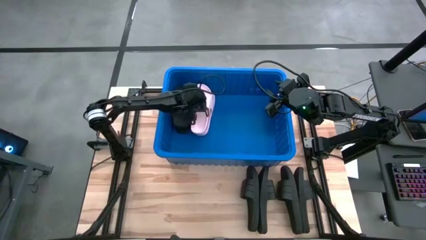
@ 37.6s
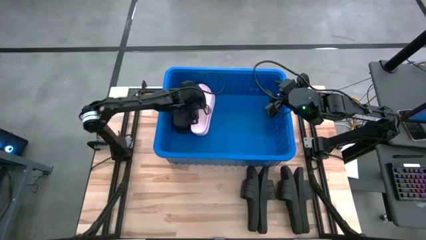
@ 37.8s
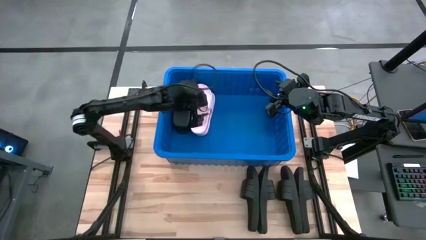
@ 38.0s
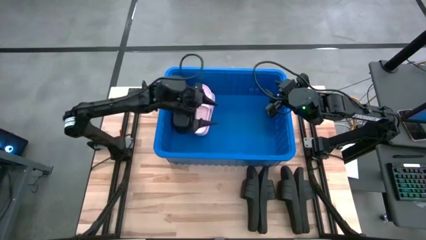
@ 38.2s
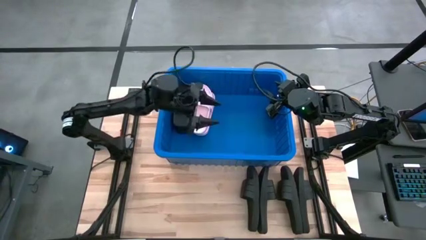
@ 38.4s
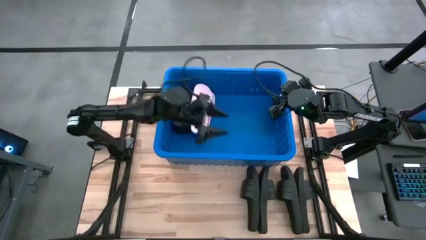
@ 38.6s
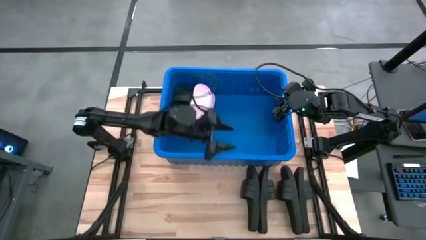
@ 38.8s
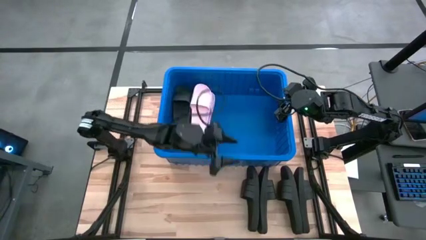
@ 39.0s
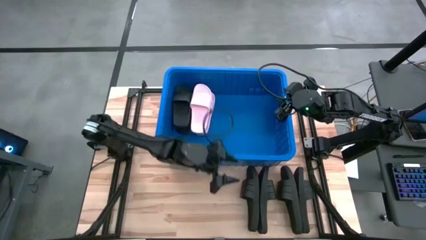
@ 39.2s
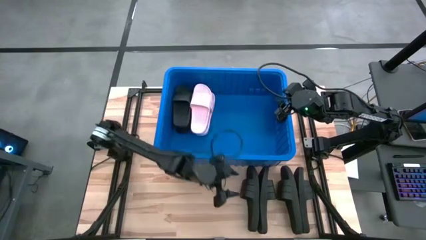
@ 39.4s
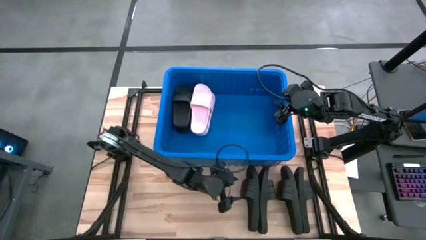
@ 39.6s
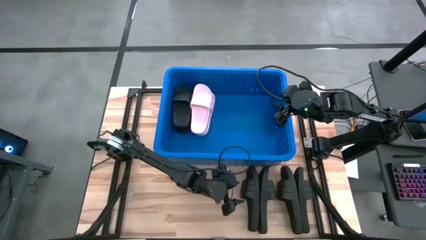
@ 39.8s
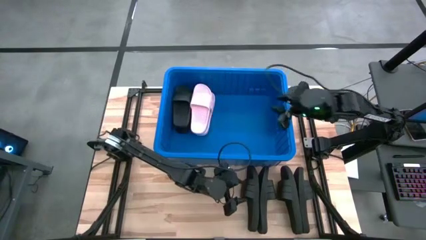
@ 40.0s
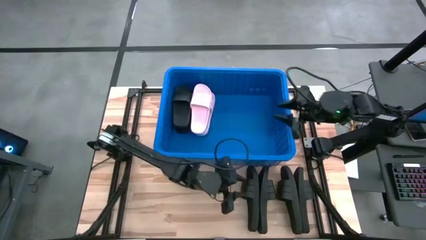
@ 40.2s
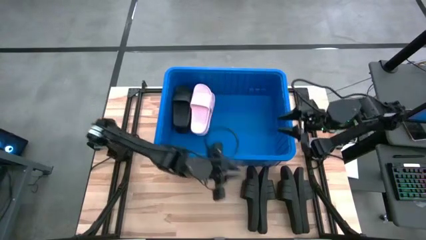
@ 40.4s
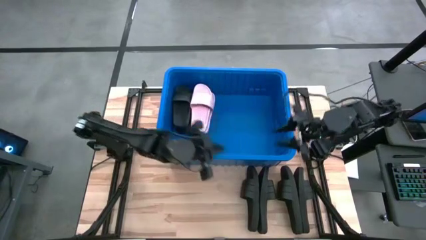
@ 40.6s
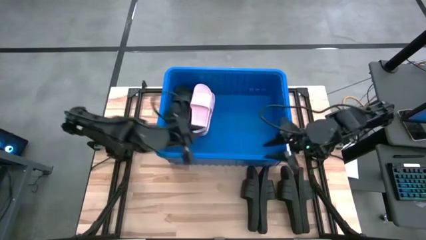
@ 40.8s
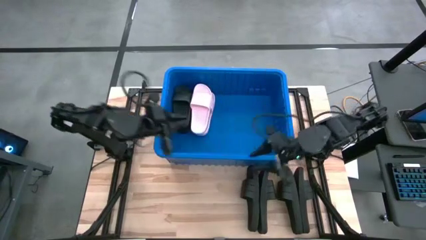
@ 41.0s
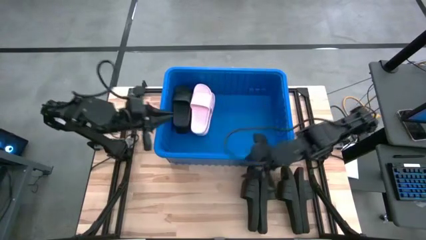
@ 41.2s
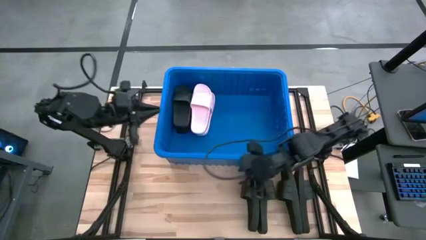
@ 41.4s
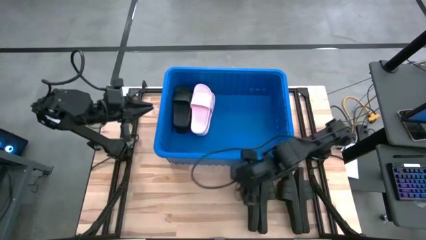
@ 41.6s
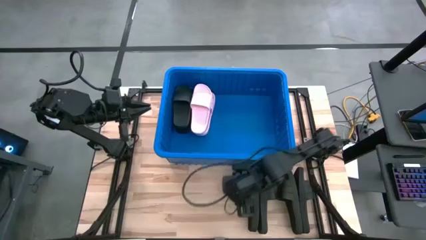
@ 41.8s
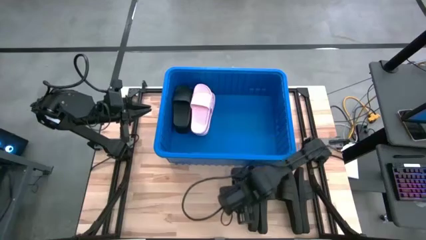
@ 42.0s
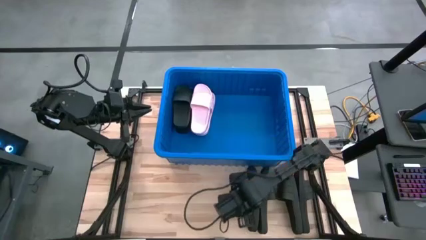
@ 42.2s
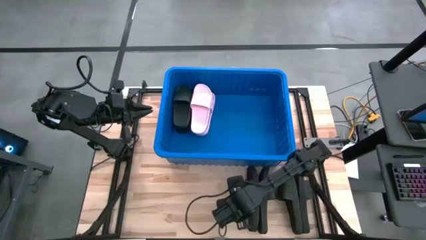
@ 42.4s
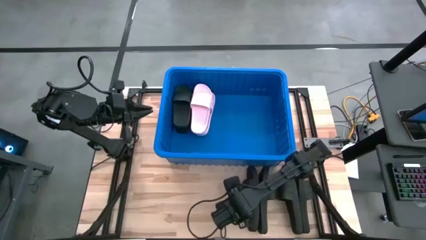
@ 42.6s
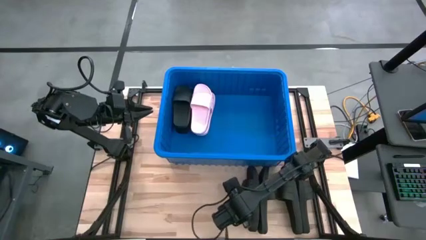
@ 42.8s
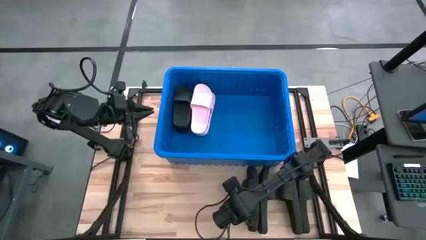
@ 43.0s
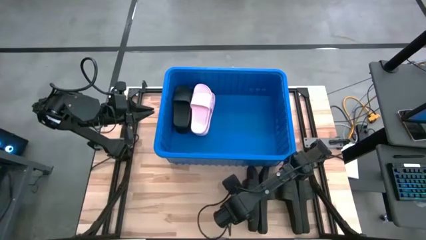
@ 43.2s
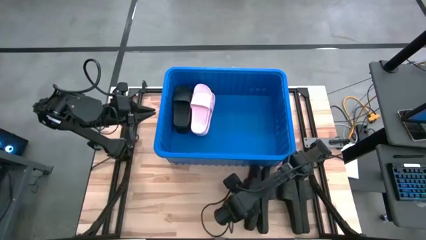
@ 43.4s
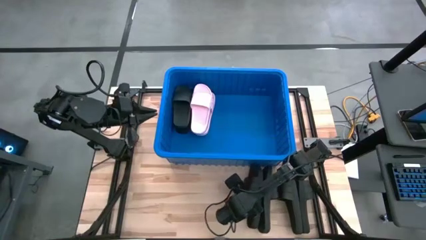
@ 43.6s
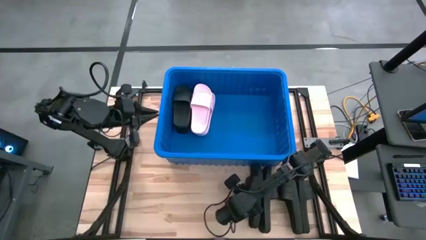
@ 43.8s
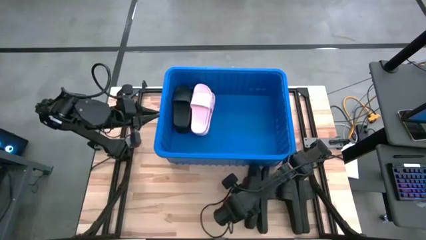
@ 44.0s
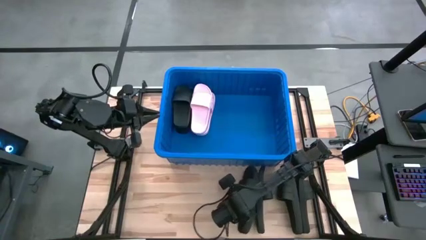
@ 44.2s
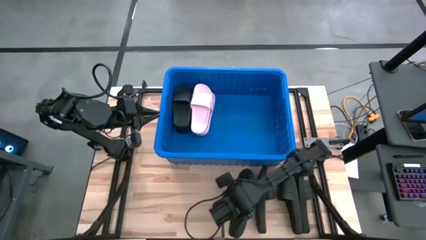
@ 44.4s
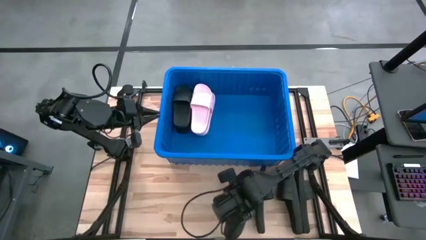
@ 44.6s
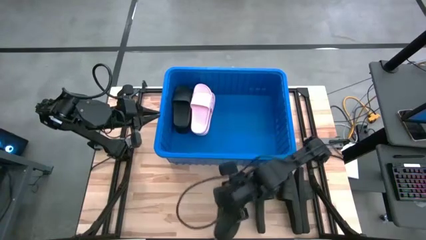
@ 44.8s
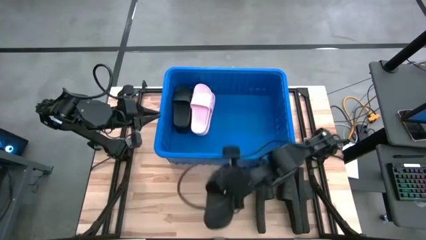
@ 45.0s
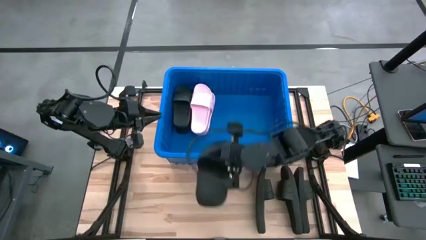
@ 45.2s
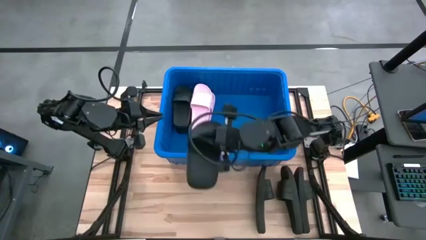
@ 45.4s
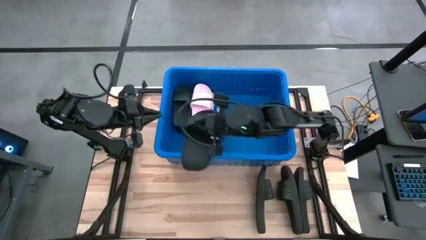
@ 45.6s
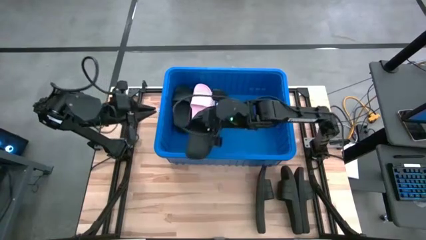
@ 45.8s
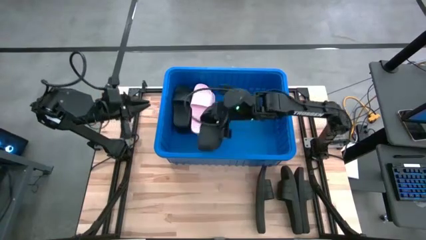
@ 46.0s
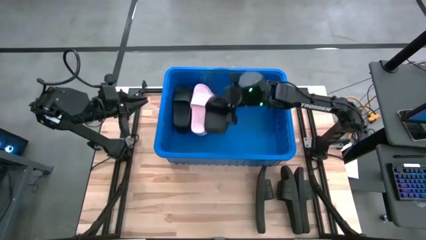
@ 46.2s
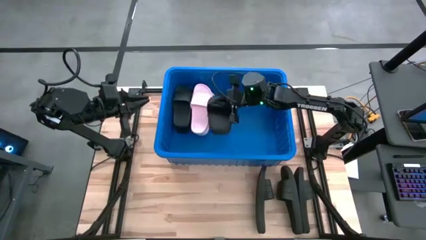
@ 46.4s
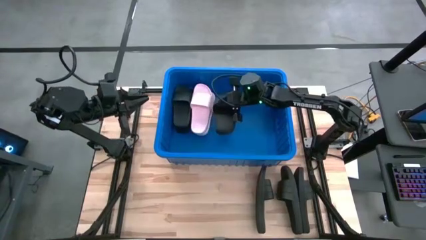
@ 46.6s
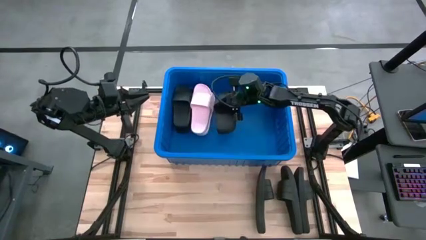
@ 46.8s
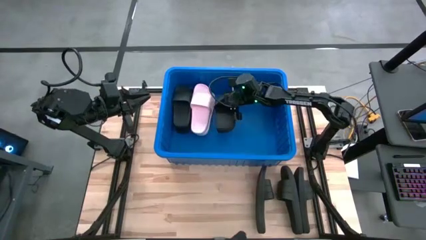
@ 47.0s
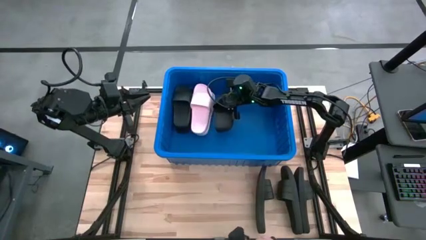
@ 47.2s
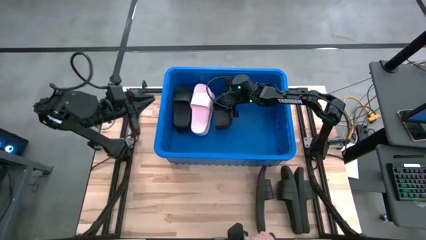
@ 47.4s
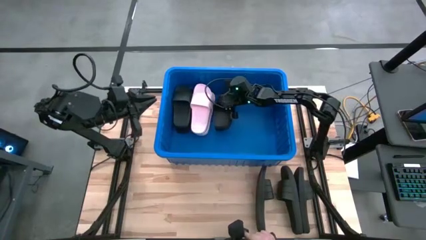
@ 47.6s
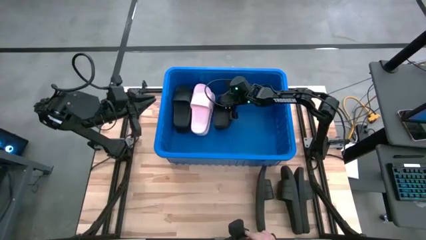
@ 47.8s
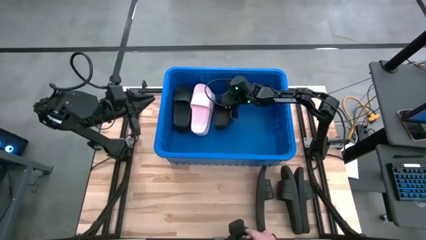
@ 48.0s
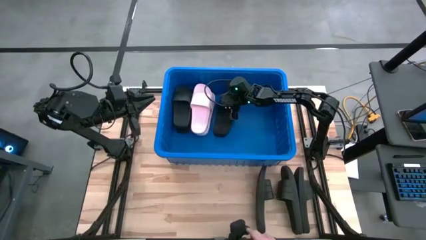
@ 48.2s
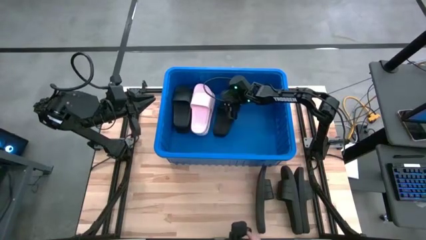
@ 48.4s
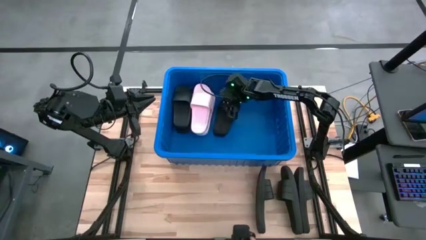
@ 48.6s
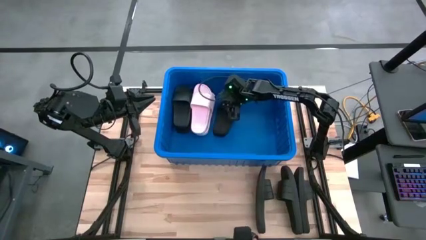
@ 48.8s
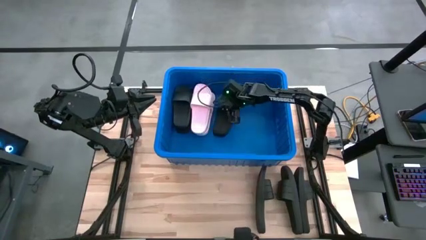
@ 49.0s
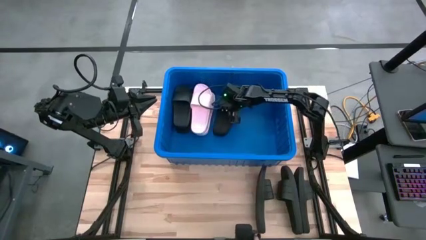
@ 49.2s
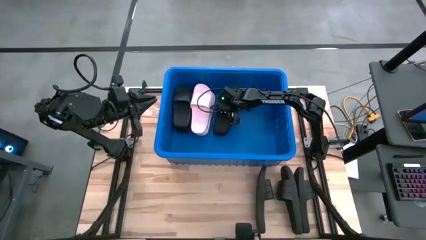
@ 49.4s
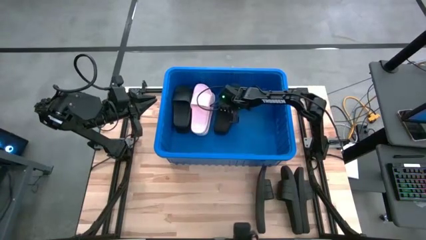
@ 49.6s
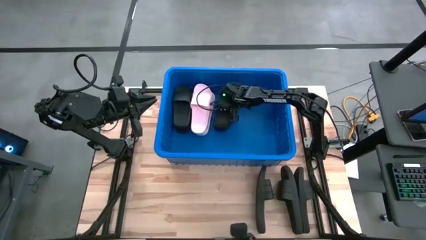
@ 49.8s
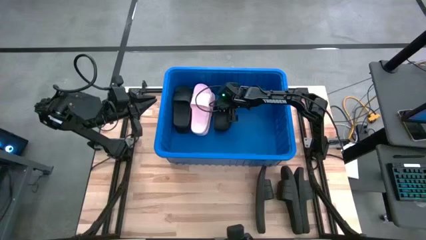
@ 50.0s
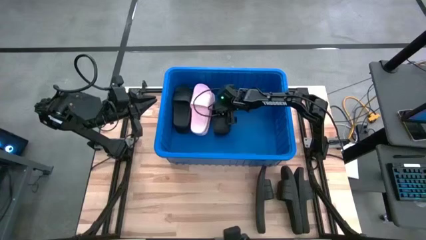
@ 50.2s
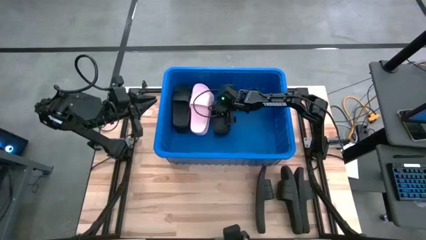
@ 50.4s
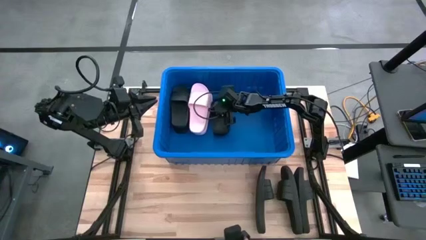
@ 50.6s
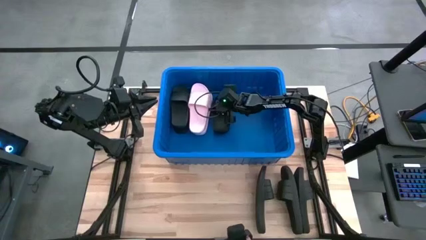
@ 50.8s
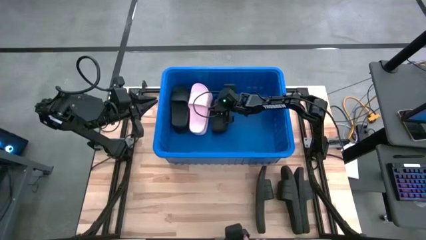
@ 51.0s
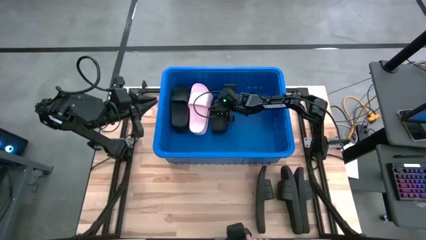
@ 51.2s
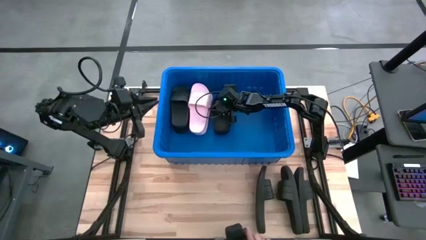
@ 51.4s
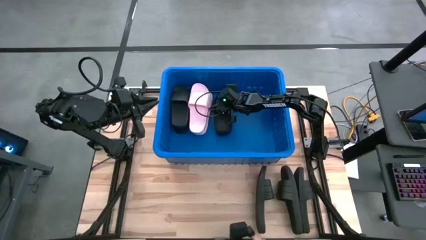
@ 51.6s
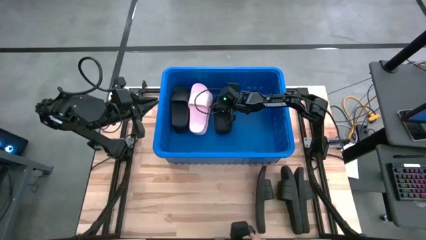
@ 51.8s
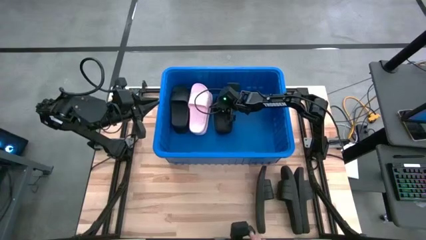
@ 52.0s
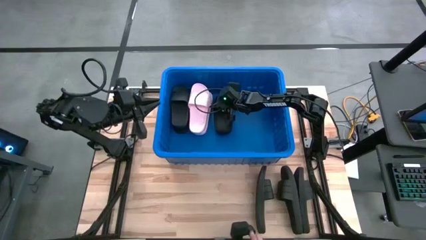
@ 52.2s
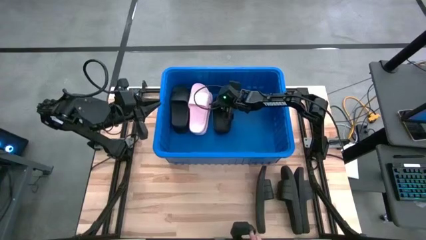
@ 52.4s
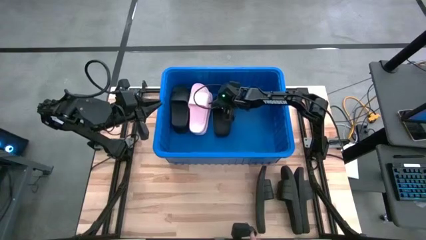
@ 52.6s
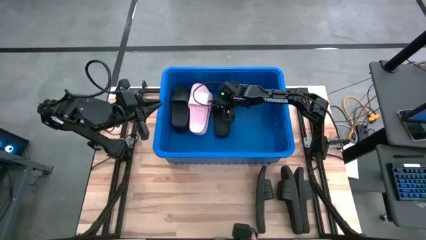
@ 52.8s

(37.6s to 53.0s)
Task: Pick and place slides into bin
Put the black slipper into the blue container
